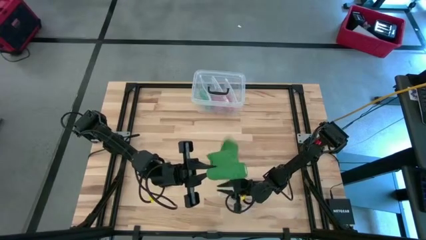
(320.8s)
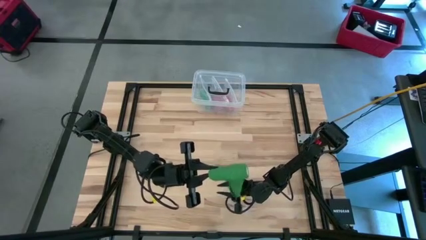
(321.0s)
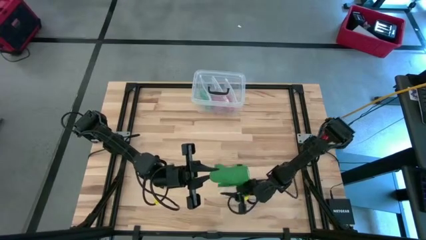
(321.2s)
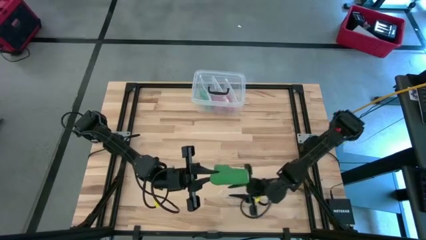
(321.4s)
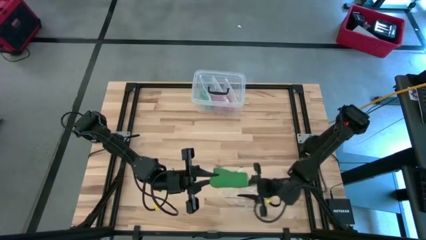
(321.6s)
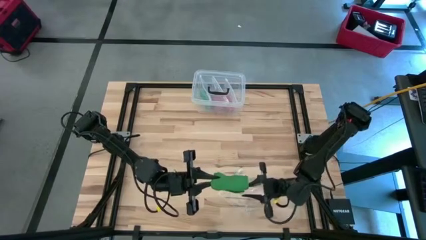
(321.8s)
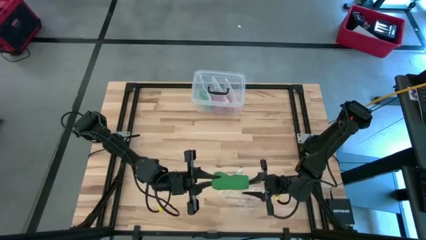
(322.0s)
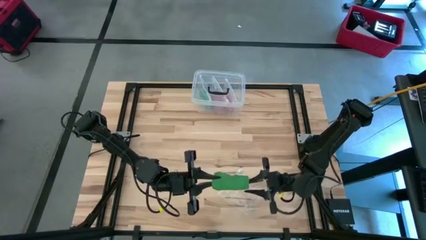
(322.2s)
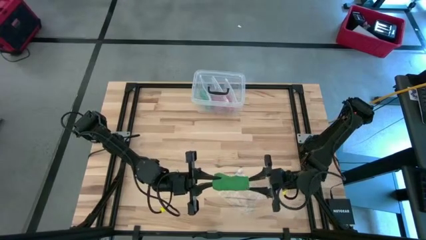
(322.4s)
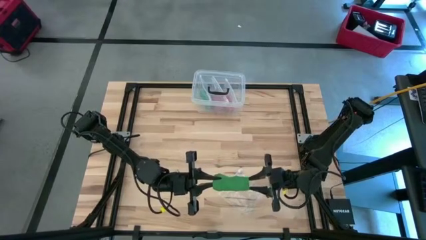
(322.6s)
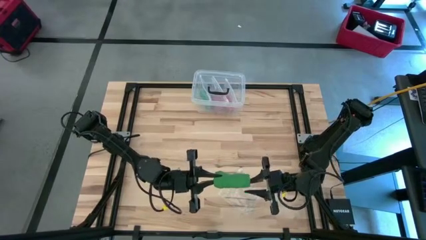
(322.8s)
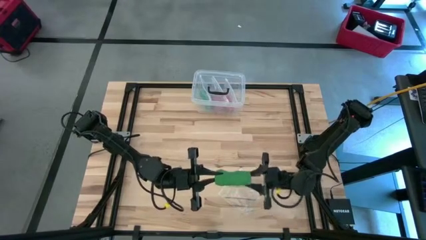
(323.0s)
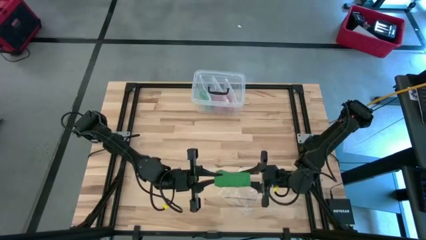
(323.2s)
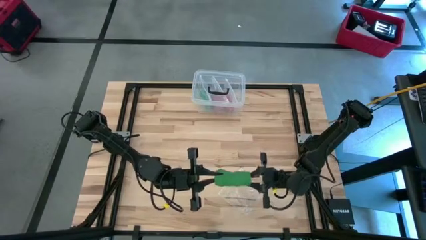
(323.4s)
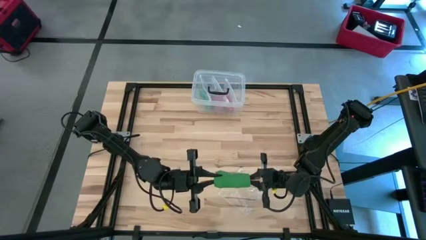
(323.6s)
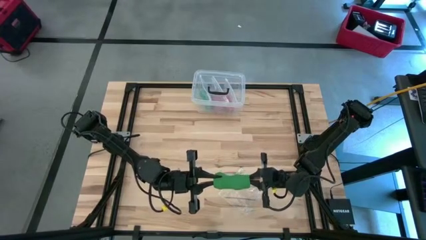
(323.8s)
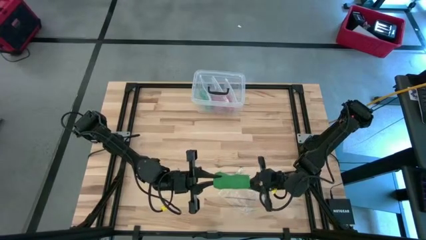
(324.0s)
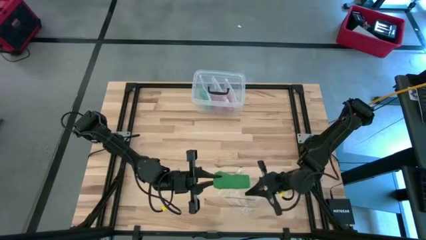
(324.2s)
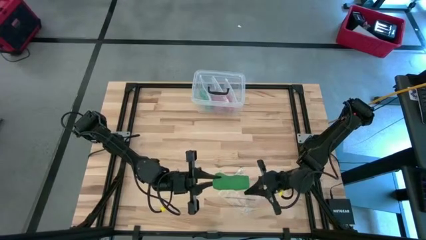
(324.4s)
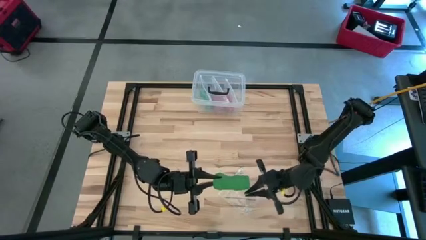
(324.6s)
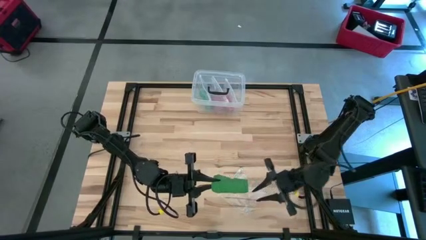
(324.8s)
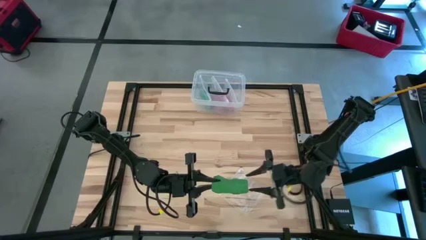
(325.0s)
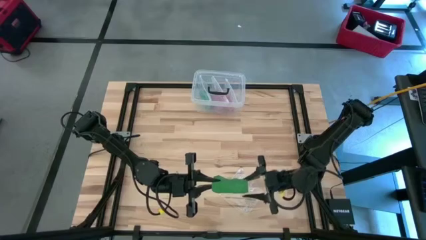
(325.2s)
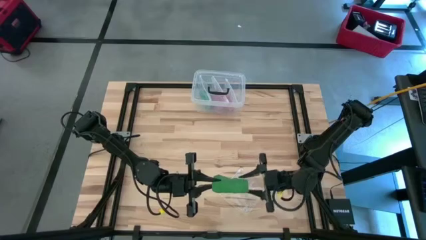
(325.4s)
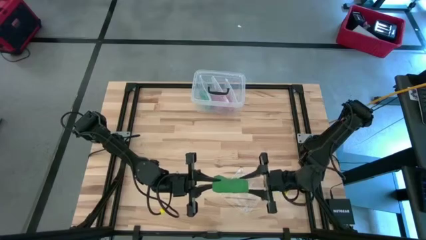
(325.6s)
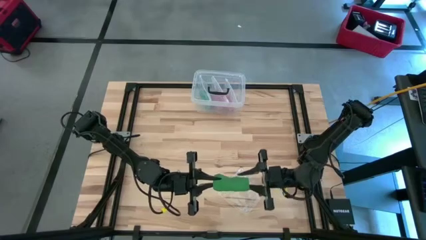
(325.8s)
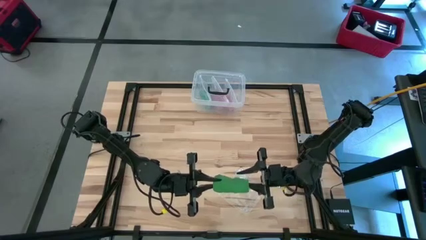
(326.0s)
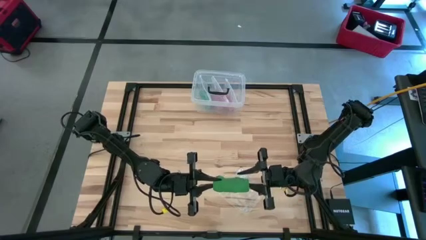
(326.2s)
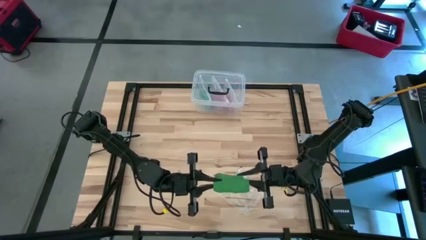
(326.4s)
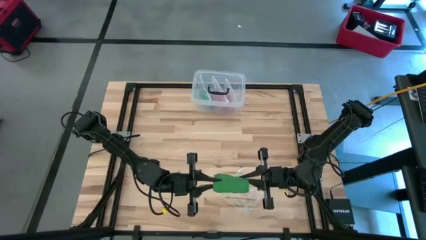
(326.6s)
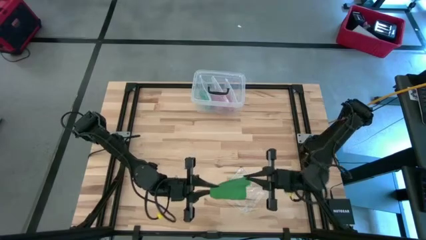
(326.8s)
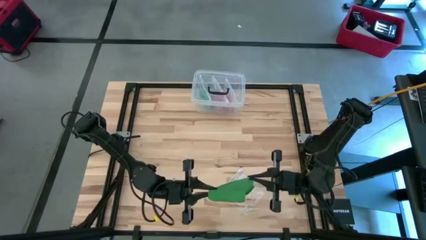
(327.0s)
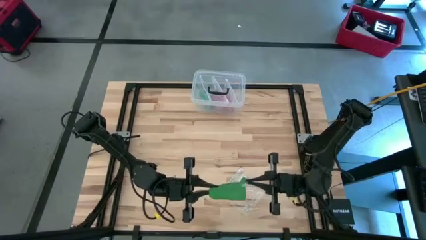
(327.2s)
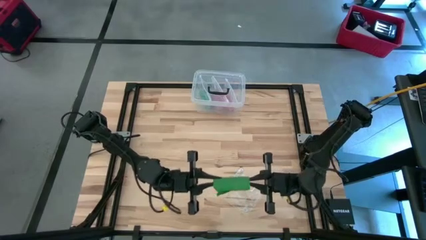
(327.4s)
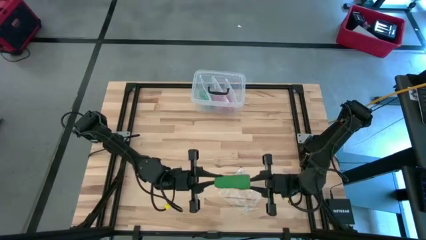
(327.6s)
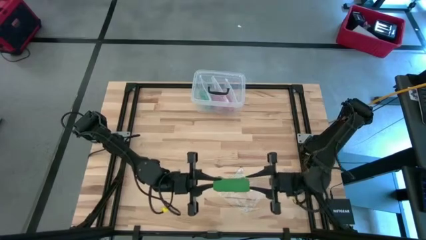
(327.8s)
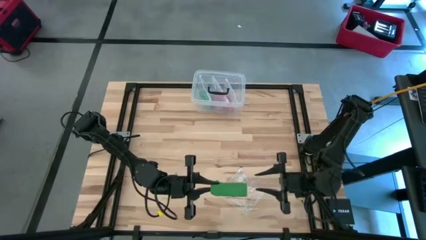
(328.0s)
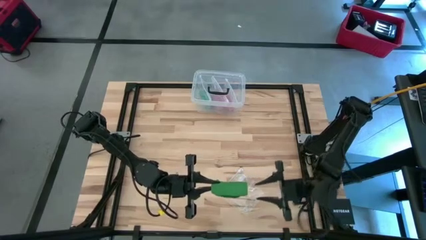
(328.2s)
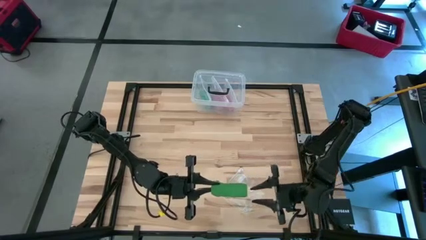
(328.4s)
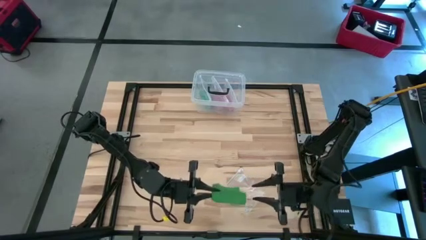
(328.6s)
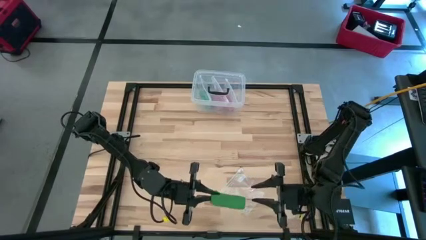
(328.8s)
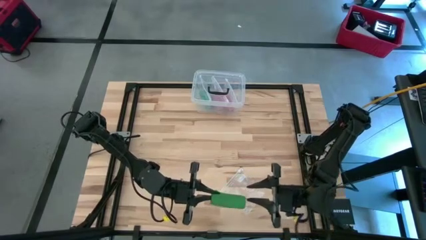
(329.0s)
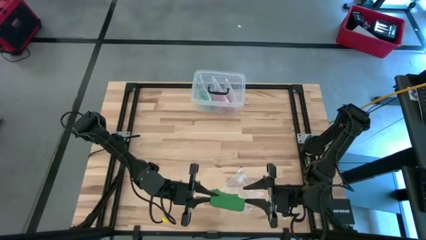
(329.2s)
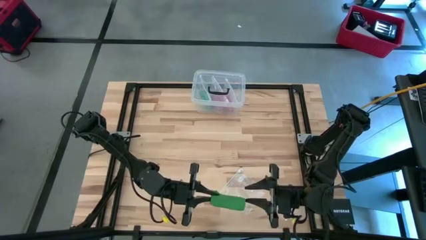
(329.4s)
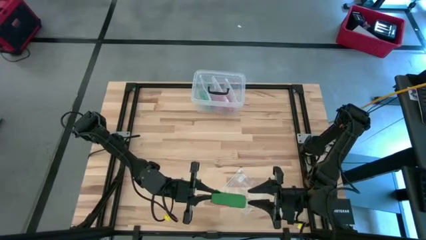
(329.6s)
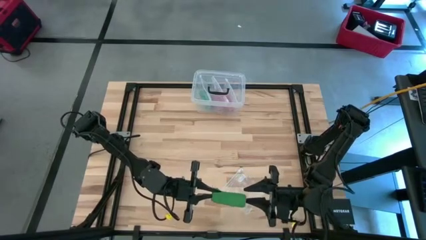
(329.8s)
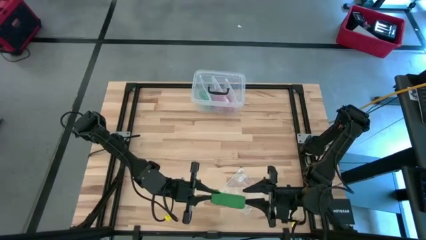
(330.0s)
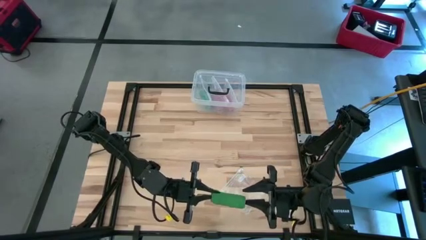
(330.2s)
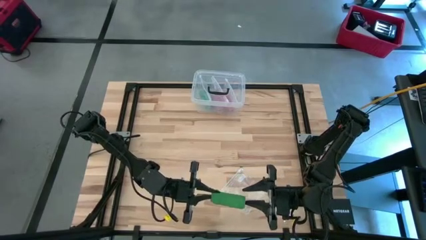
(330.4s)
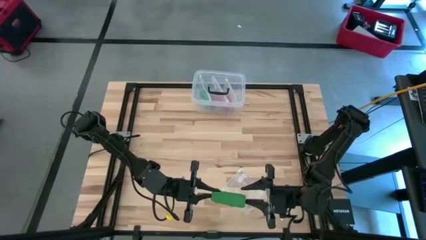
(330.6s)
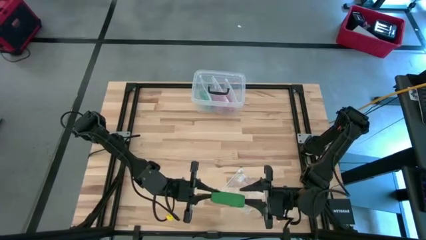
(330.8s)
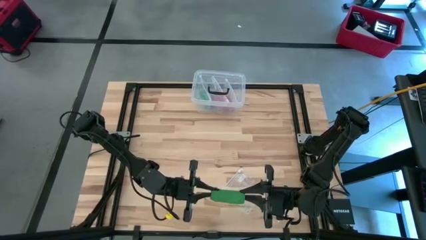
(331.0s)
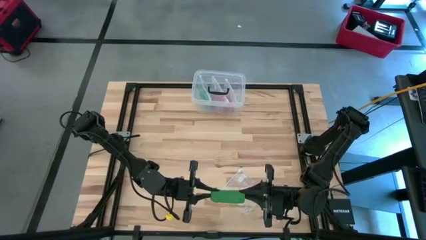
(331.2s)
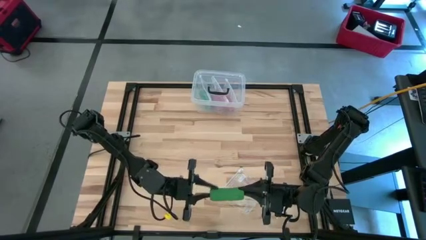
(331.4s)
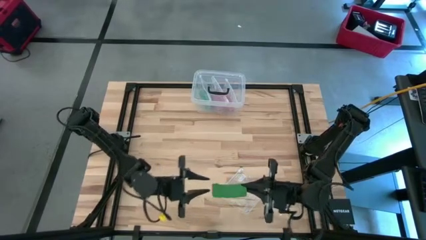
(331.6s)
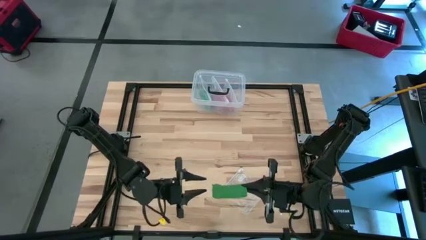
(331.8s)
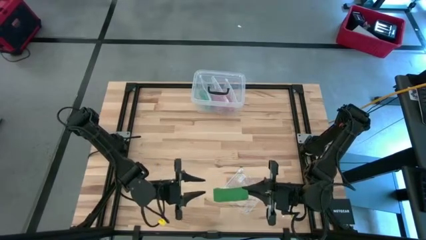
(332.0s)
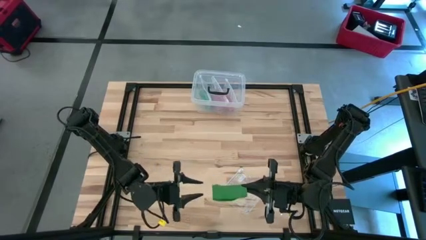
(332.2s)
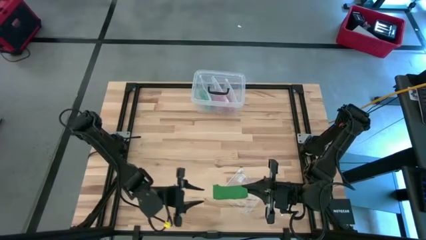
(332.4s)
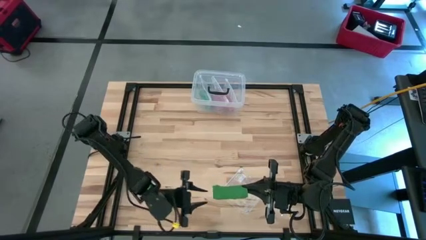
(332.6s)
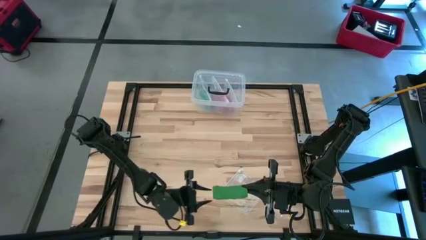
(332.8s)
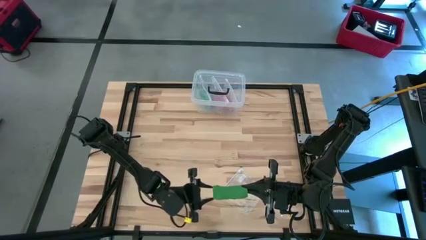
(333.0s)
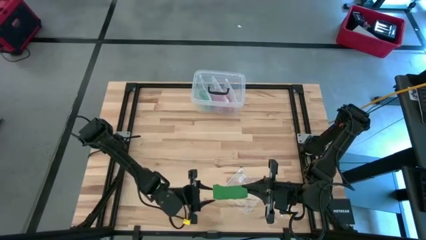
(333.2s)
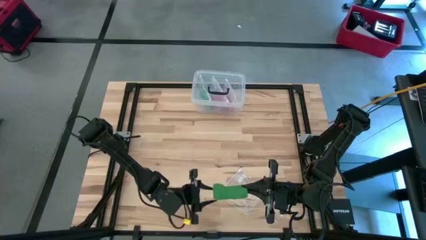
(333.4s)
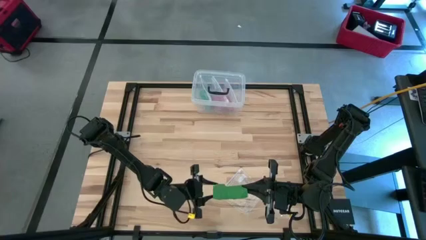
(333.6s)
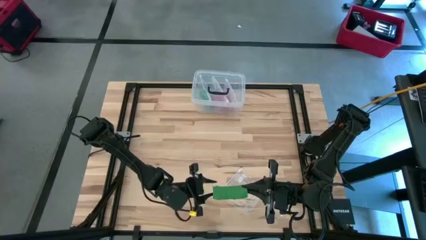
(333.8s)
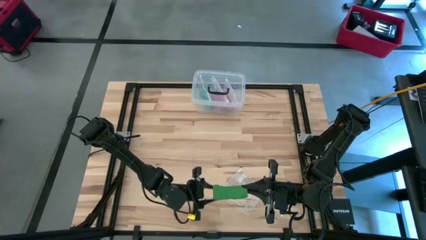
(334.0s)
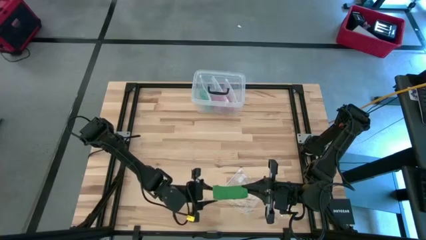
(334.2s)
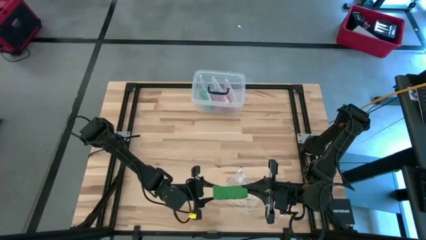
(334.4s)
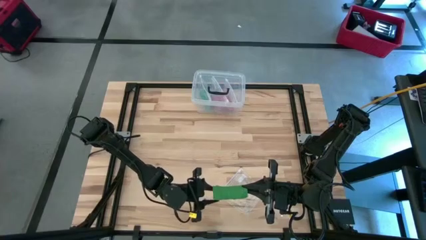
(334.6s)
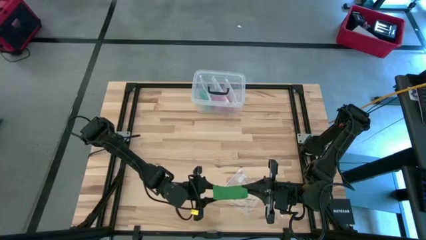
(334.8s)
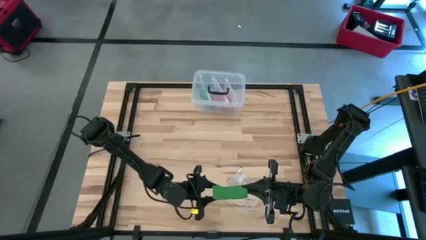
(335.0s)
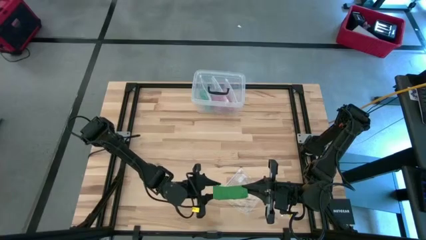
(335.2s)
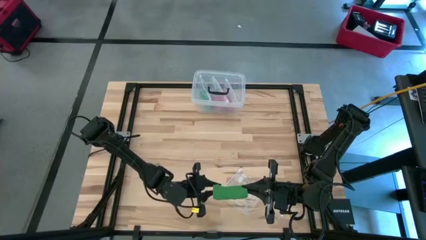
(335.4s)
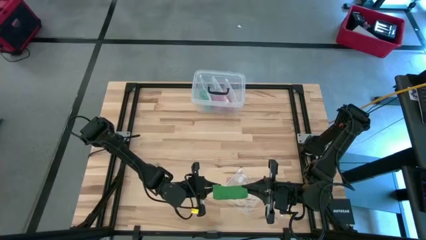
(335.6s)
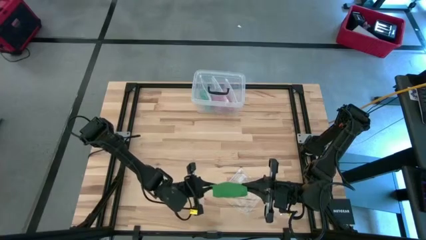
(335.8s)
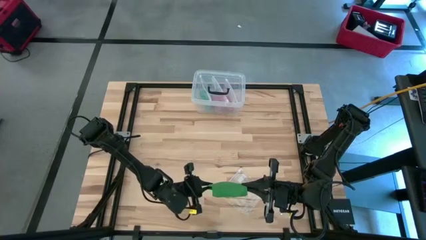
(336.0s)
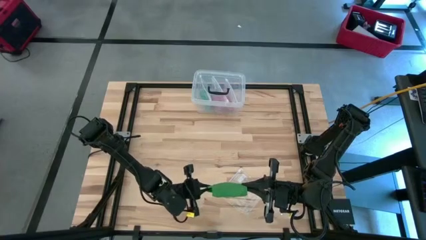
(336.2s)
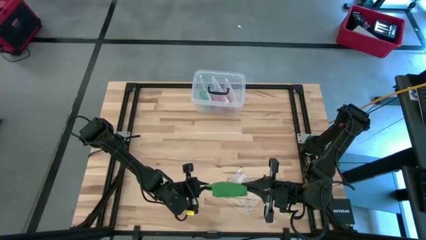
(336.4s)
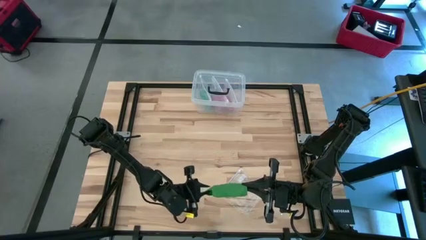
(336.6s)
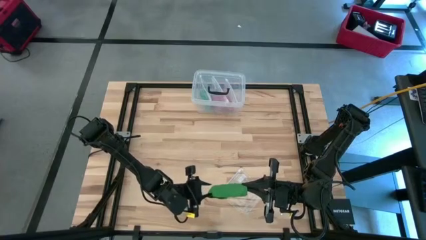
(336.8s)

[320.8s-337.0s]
Task: Roll bandage
Roll the green bandage
